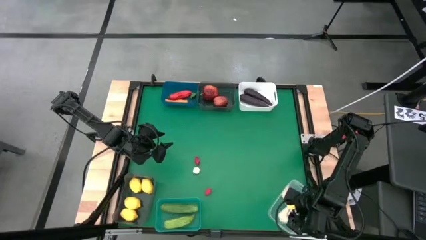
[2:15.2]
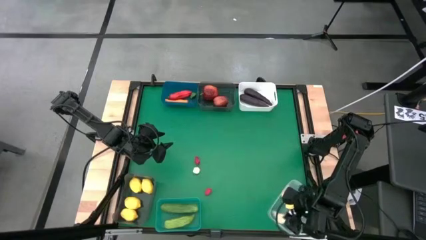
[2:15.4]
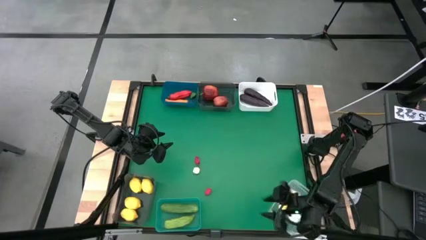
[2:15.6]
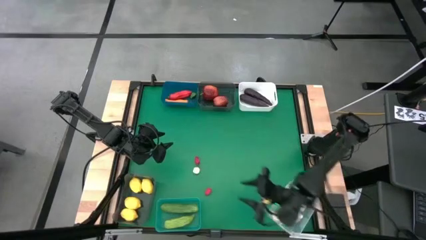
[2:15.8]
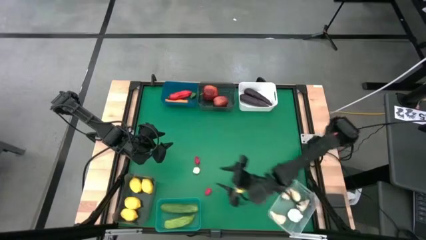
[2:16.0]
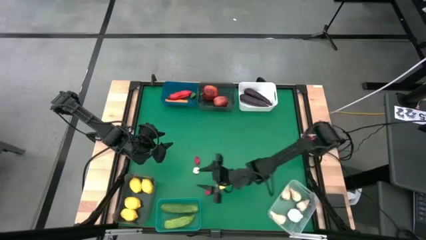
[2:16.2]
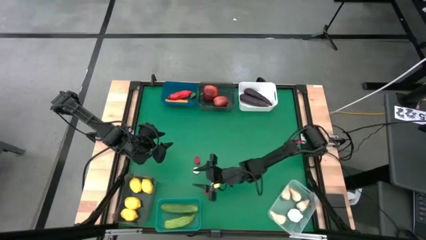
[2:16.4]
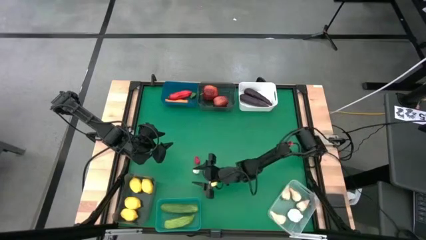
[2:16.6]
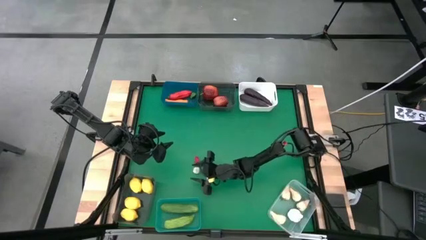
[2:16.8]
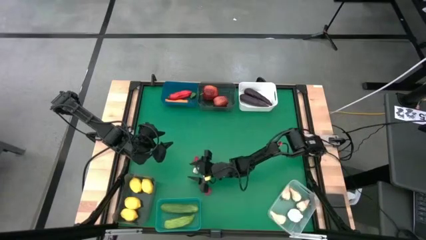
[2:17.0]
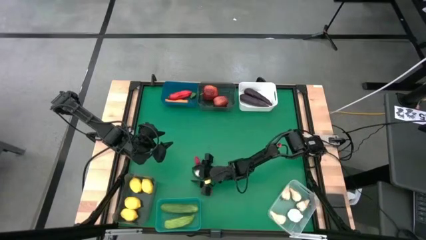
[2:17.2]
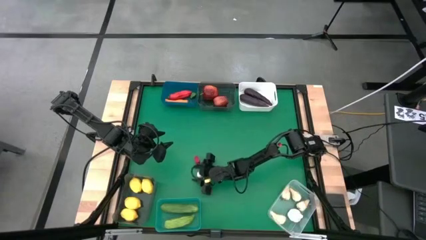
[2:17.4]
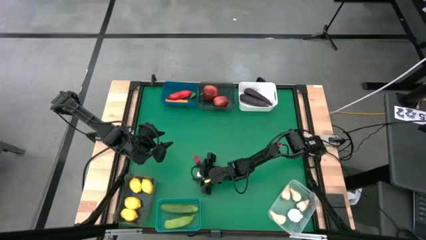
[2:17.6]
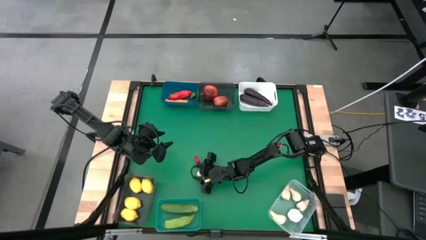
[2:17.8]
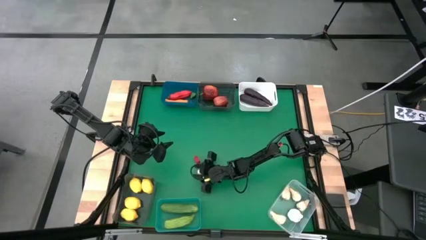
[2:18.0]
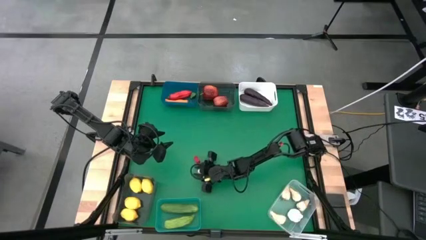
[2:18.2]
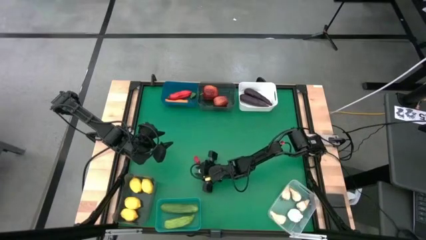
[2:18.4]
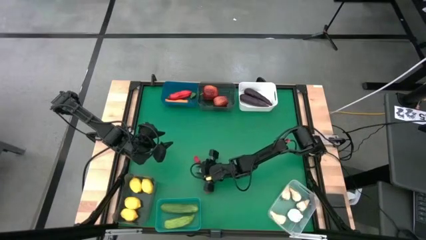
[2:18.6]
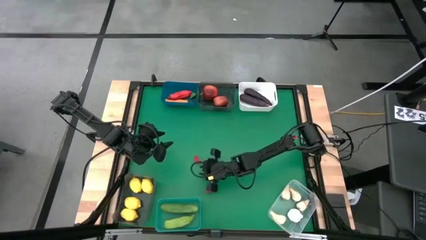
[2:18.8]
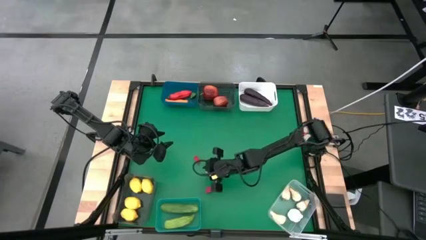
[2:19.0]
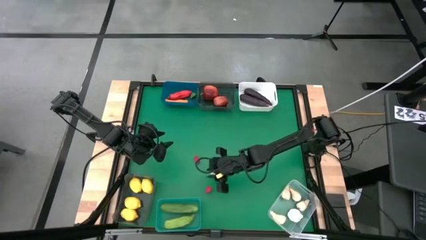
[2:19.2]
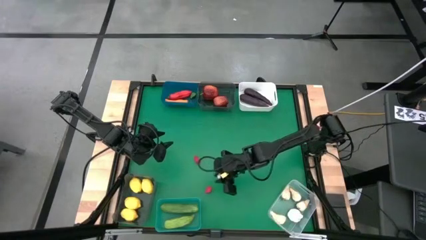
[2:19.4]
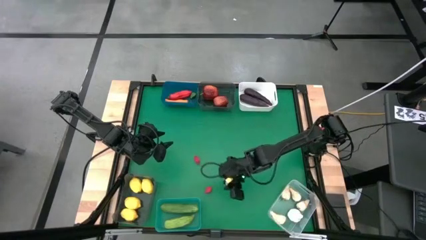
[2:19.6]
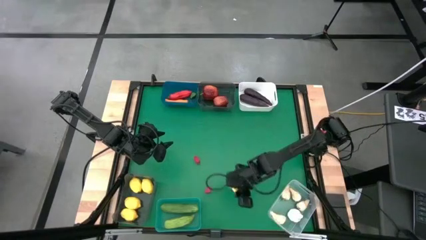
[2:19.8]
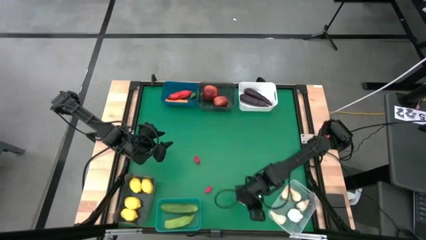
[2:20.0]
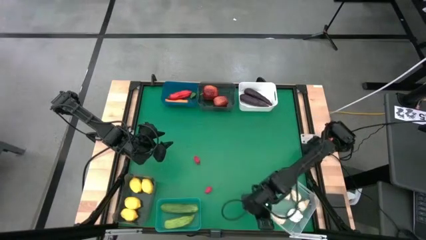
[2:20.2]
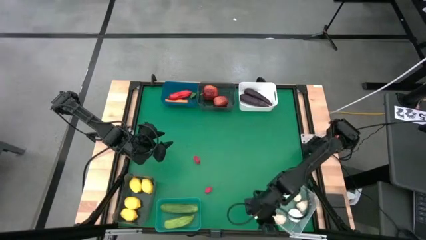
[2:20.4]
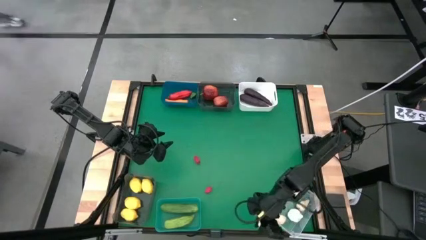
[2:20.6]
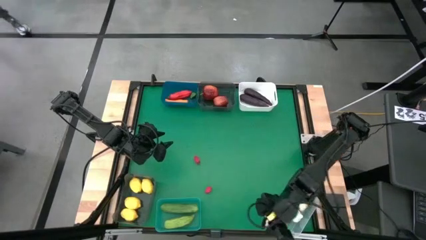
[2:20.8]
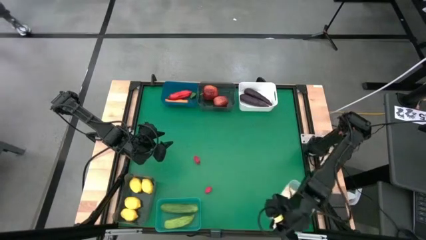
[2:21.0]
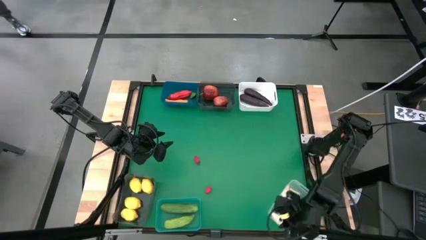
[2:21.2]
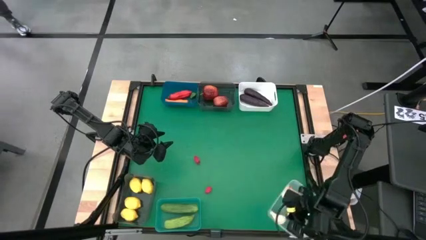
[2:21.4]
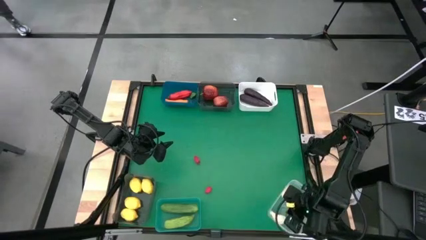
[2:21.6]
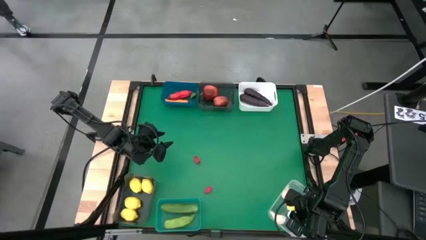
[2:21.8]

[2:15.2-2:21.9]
Task: Sort produce into baskets
Put the white garlic into the transparent bin

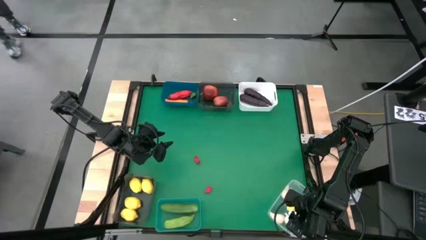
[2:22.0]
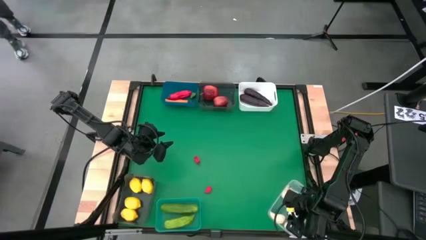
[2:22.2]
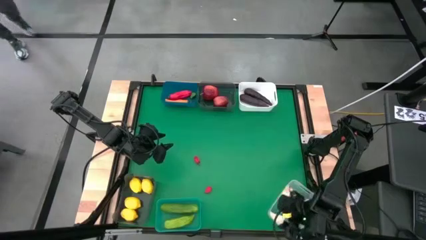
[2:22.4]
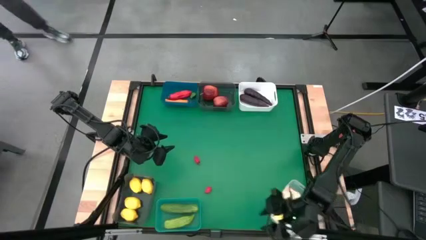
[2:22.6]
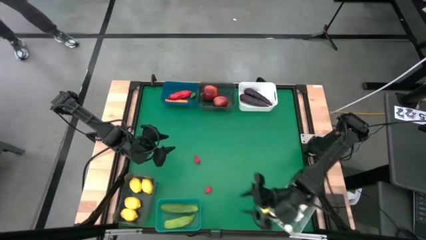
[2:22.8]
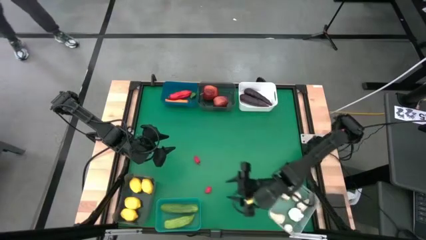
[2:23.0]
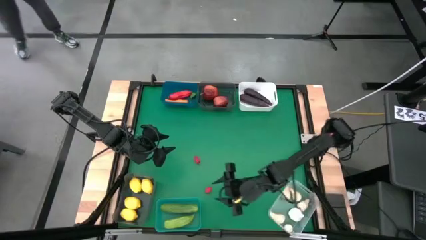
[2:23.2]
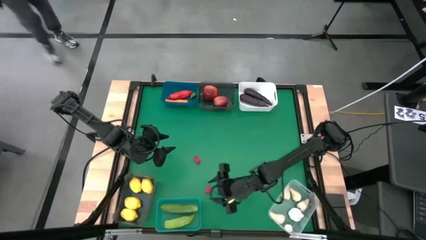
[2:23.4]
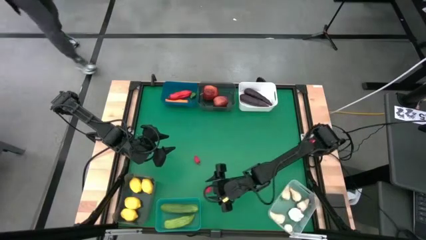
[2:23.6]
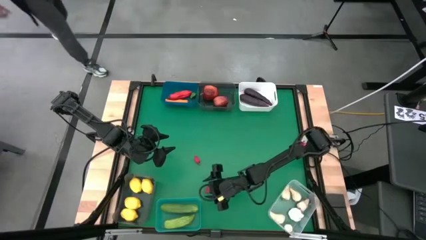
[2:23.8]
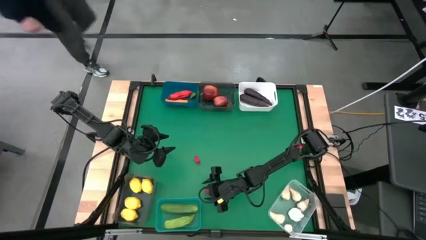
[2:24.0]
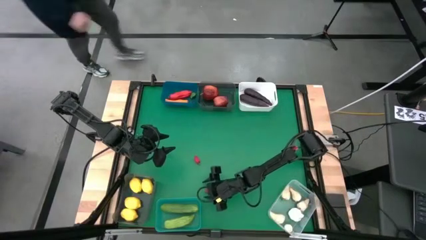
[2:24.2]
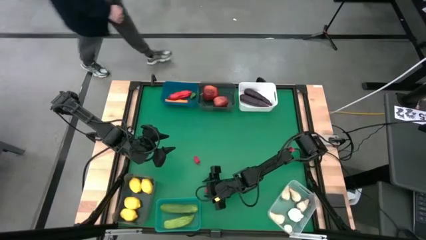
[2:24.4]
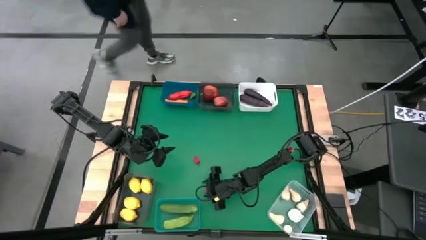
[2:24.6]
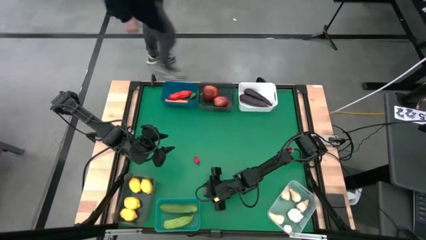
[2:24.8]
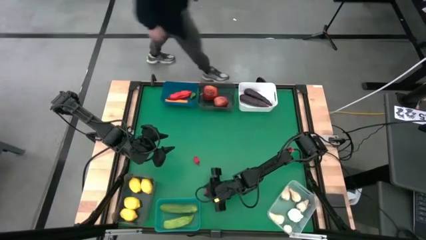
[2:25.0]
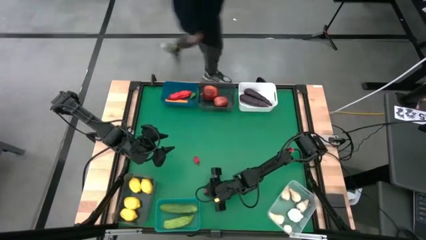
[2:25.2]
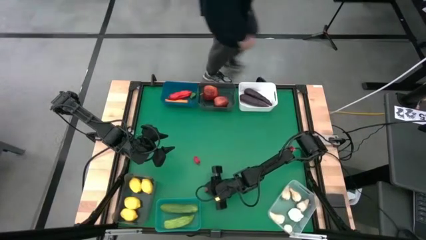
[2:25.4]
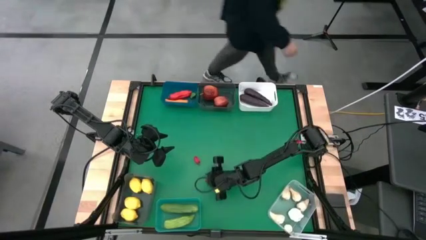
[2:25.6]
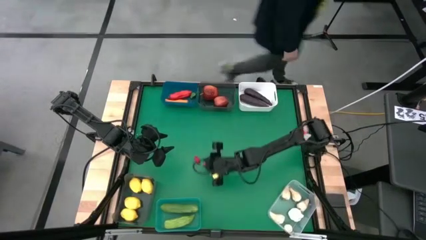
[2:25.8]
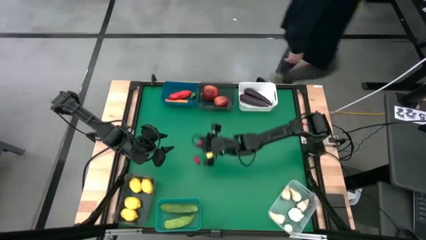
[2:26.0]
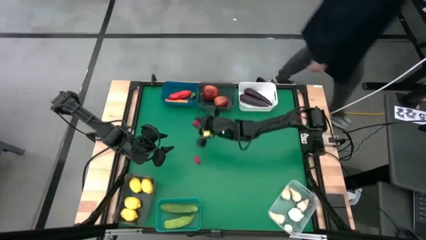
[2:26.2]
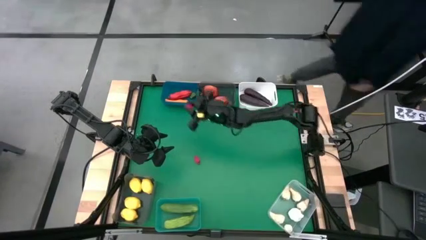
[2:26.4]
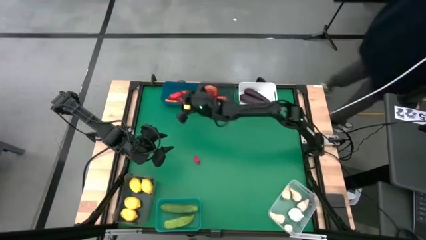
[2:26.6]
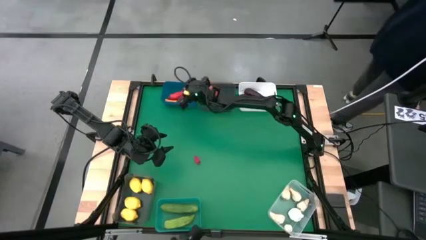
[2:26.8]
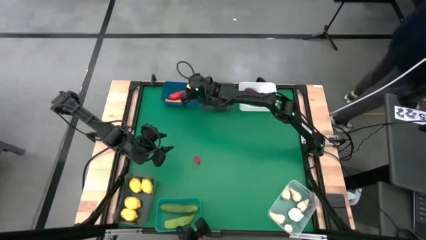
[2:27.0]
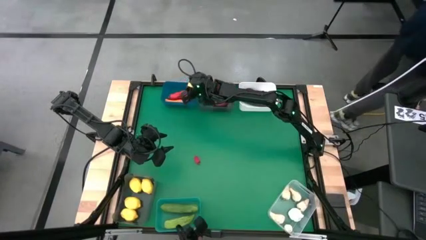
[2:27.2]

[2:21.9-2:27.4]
Put the red bell pepper into the blue bin

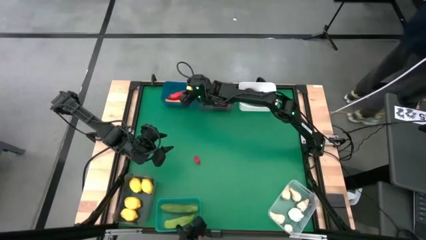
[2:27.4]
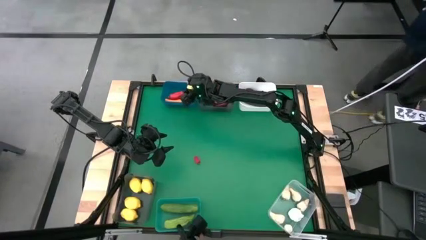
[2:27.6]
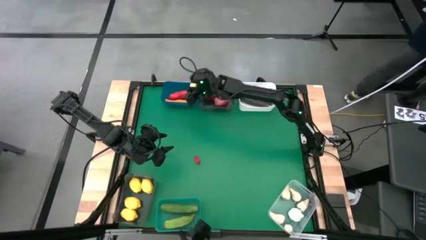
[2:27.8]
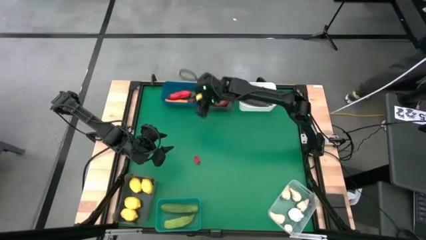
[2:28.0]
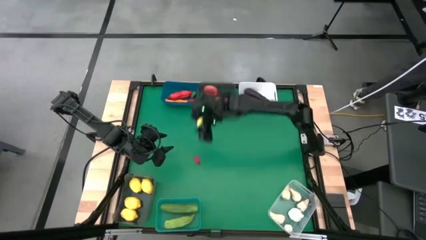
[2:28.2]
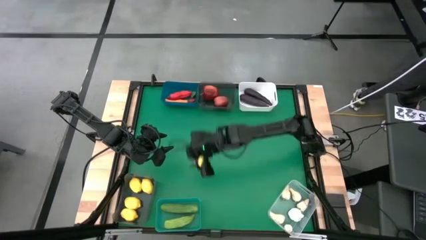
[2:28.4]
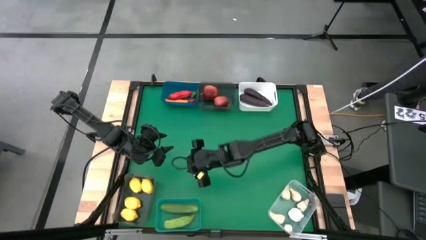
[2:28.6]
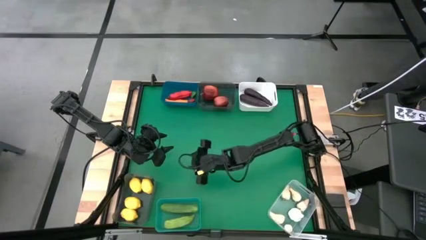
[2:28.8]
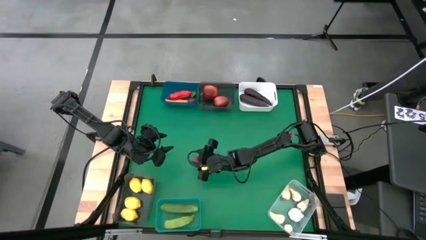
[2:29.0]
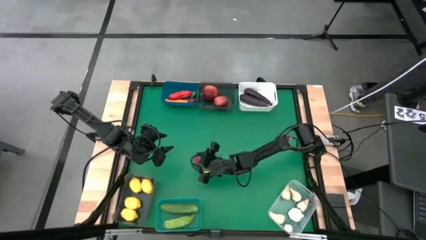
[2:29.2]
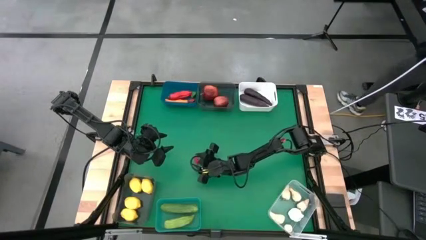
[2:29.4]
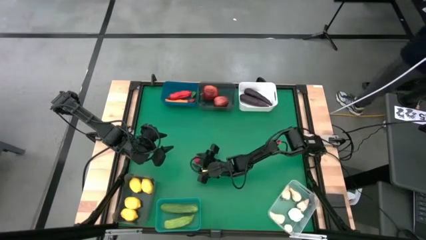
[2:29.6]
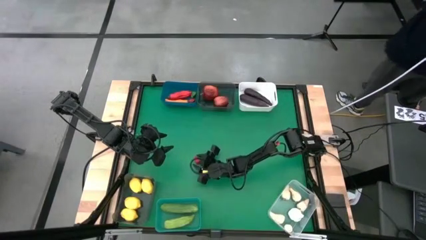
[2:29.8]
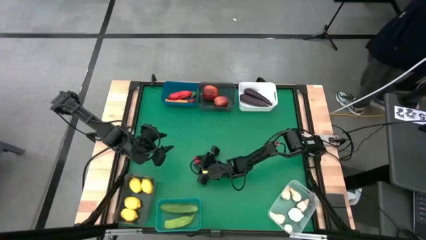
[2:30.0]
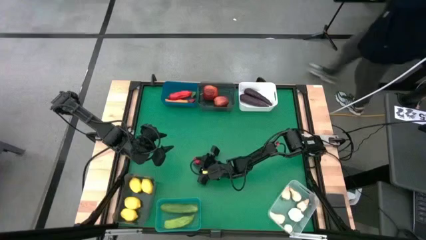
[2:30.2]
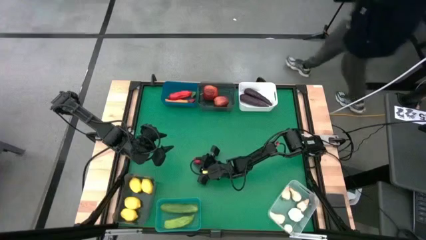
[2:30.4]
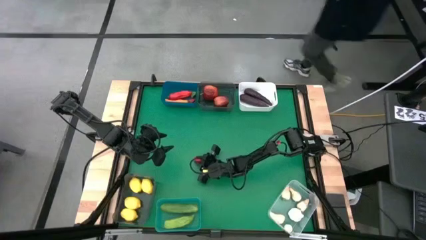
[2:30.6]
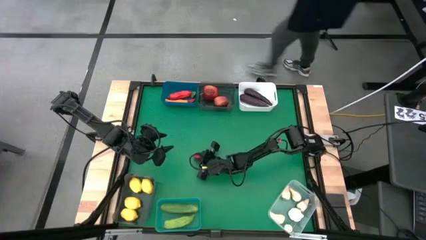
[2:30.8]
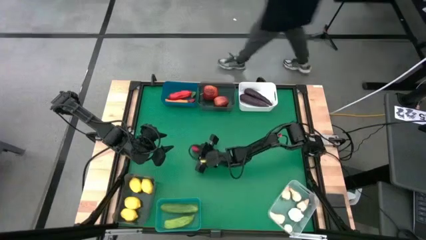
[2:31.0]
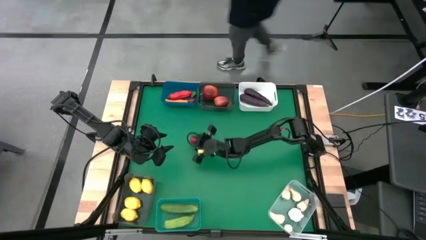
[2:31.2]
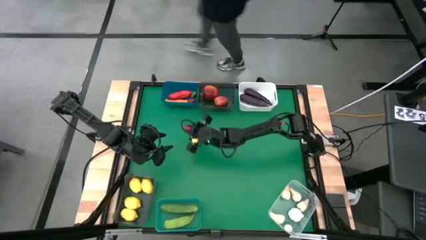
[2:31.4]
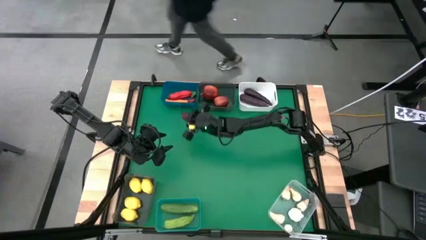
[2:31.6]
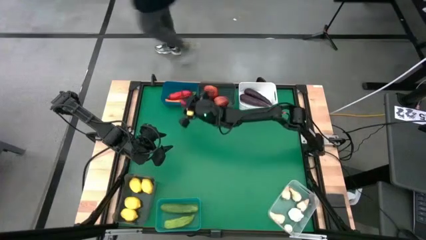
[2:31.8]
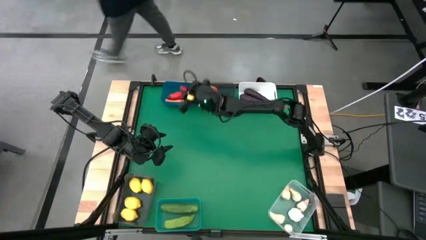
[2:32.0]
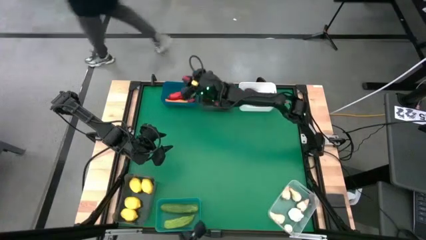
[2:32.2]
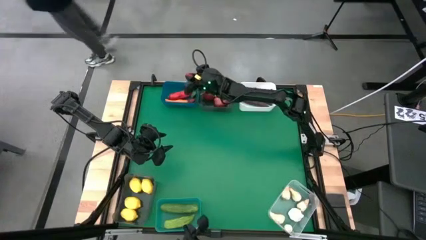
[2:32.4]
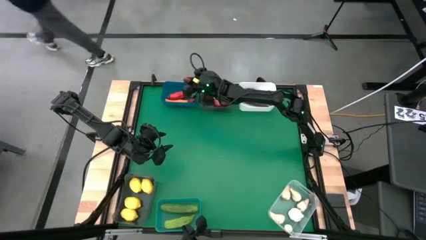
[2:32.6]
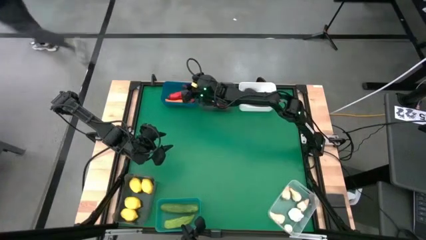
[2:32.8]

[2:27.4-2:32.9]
Put the red bell pepper into the blue bin
